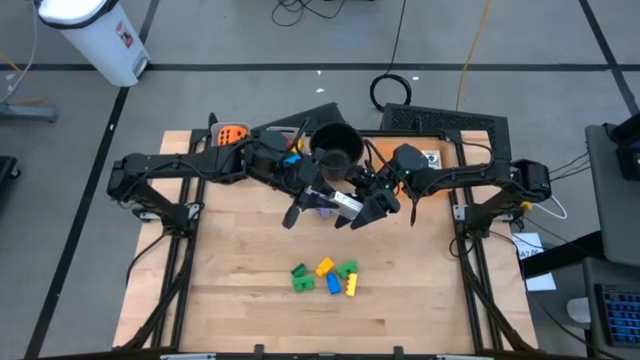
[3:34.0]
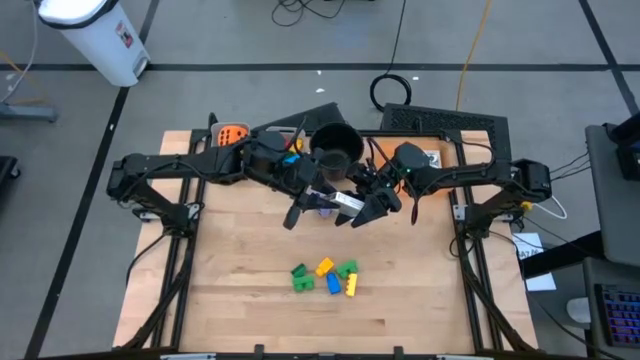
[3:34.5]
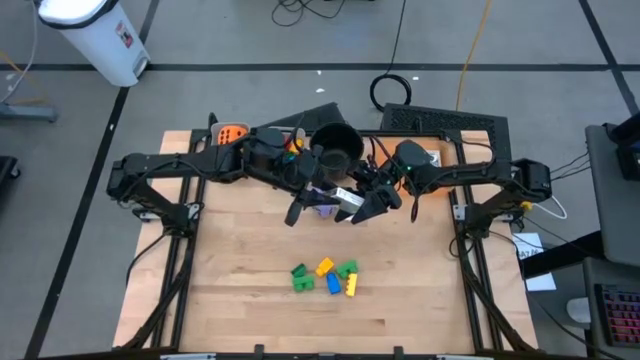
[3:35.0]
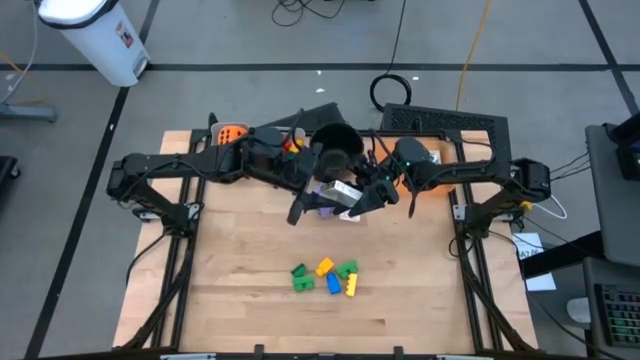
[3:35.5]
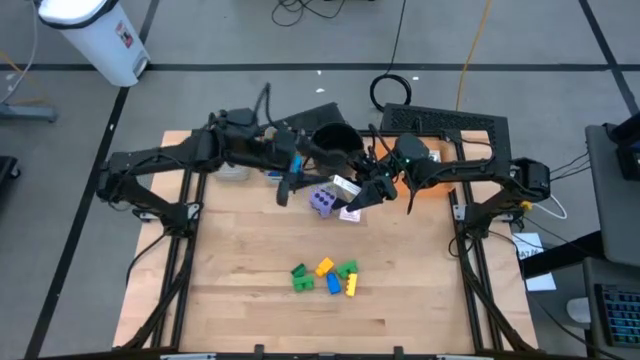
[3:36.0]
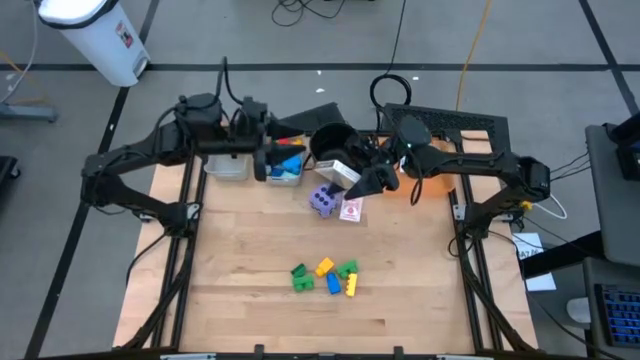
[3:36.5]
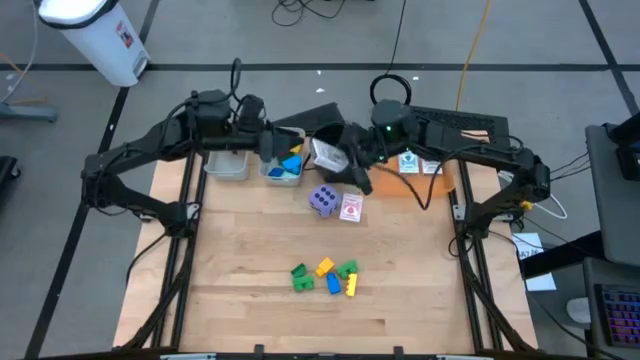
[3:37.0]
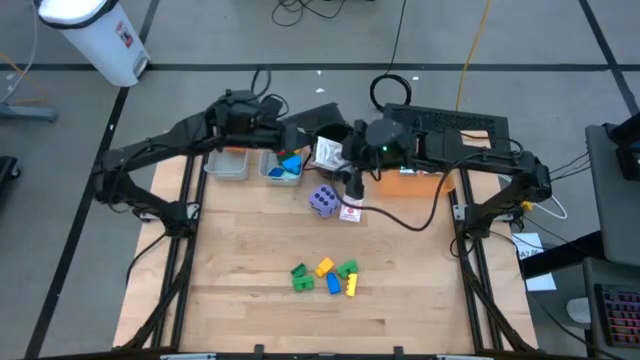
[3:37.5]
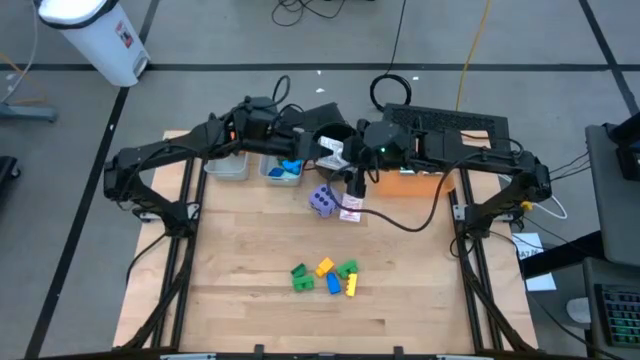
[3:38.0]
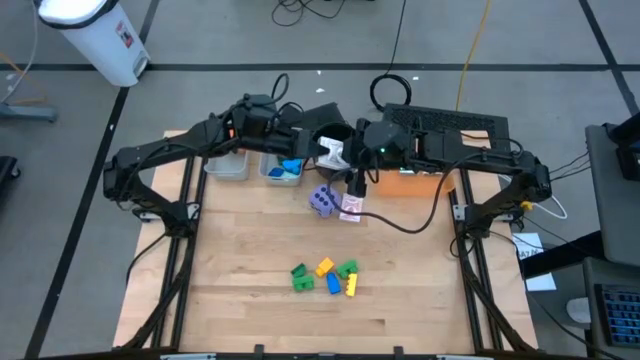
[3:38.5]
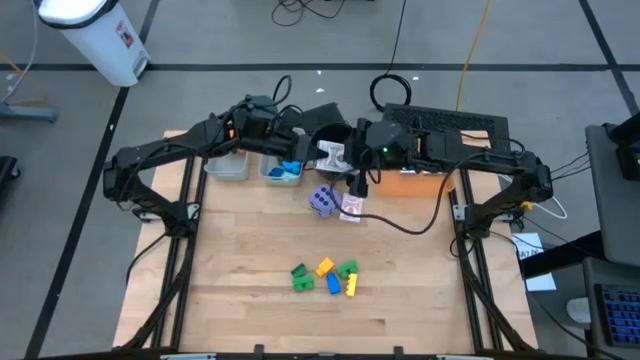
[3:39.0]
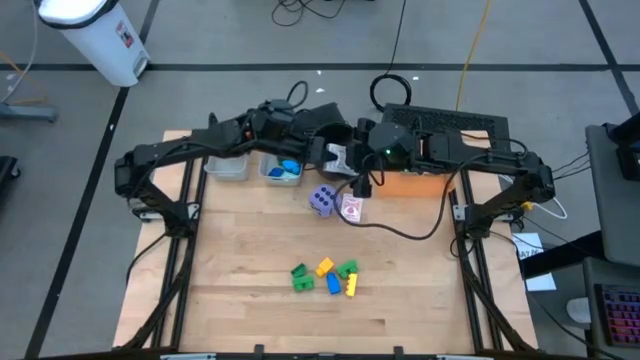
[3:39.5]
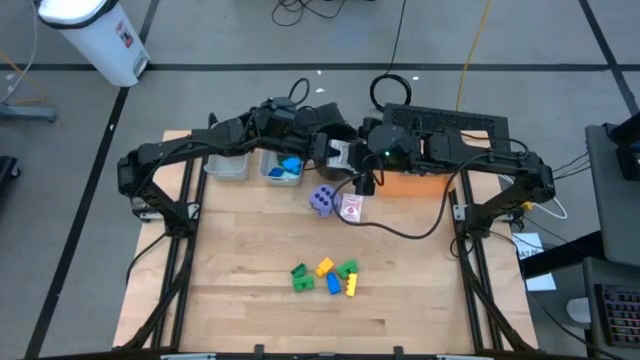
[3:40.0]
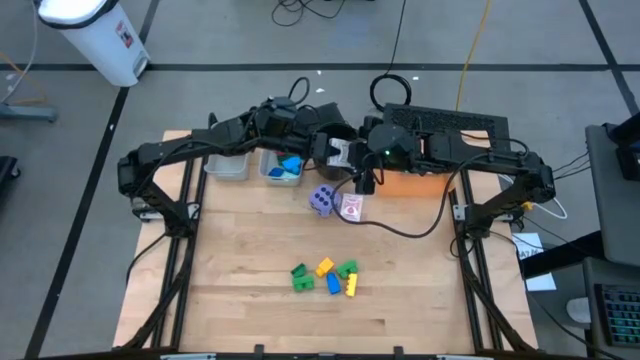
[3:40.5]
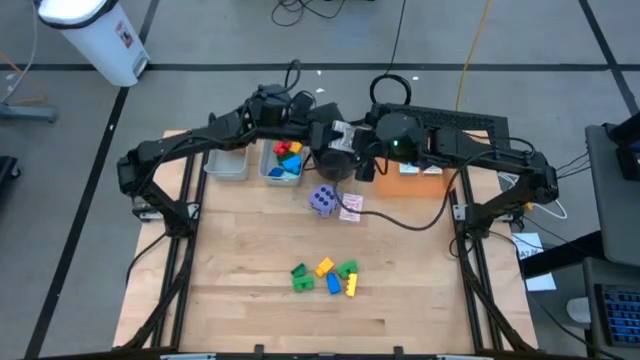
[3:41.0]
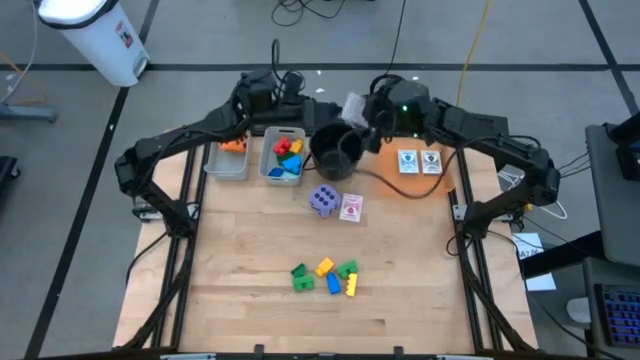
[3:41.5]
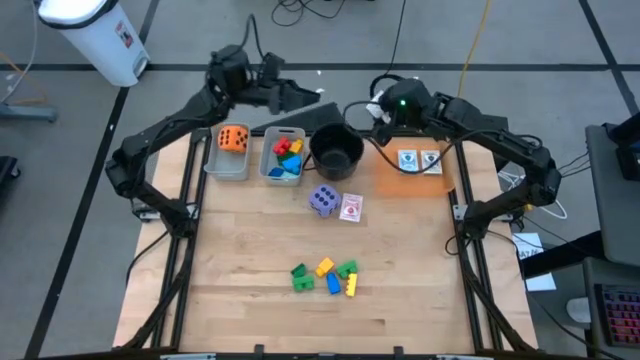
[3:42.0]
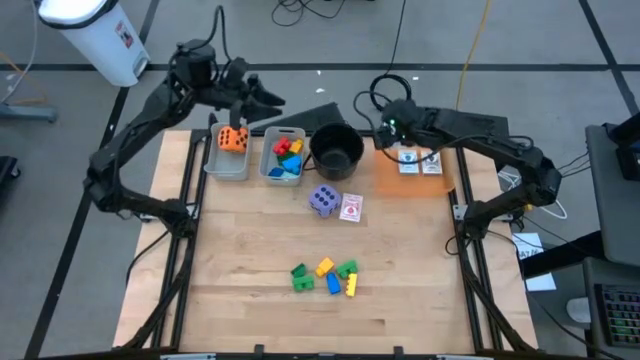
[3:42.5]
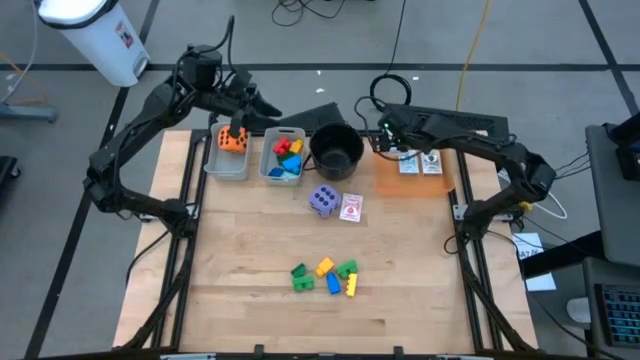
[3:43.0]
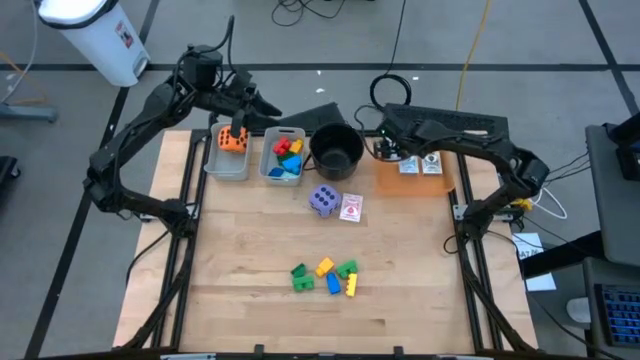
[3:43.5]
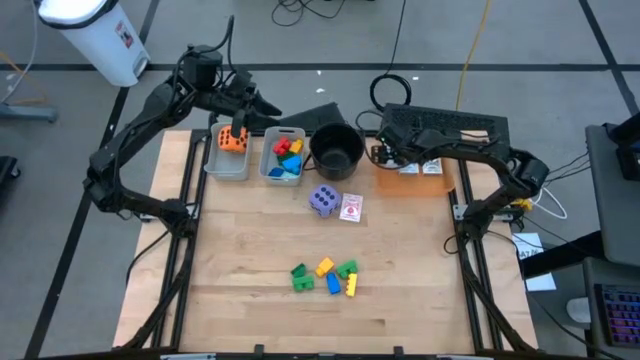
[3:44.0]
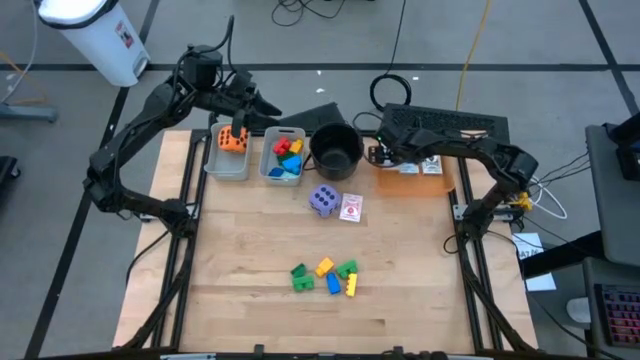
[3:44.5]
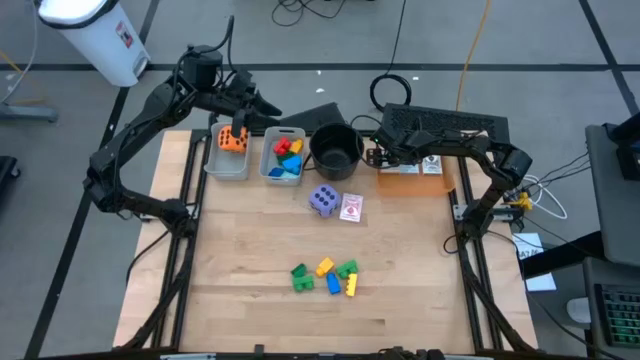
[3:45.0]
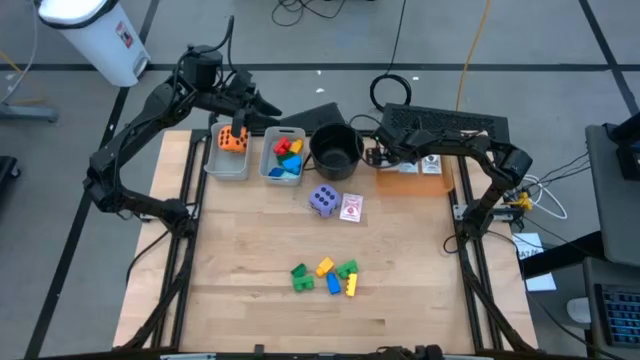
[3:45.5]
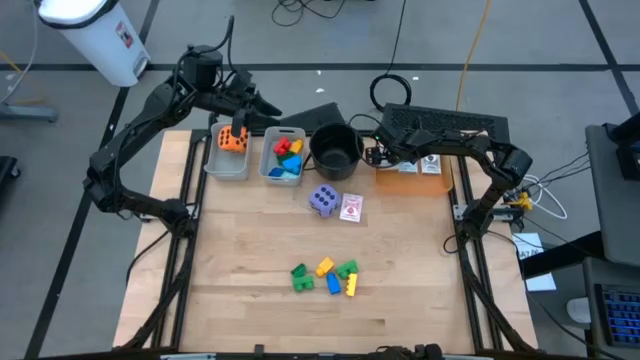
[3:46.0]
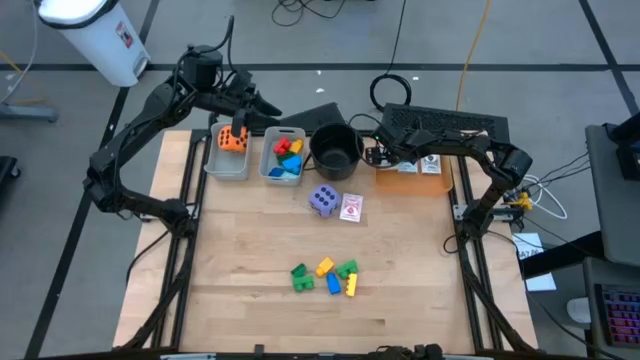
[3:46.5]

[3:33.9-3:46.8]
Task: Pick & Place Toys
Put the brown deck of cards into the orange bin

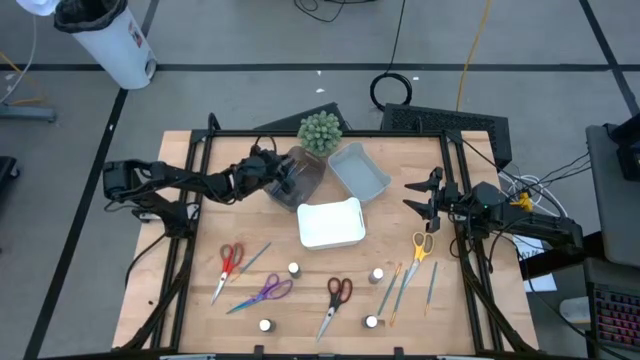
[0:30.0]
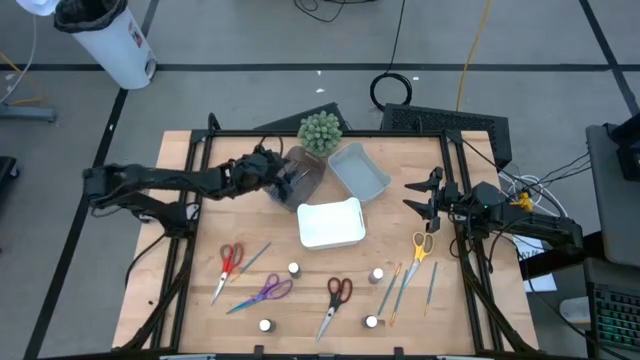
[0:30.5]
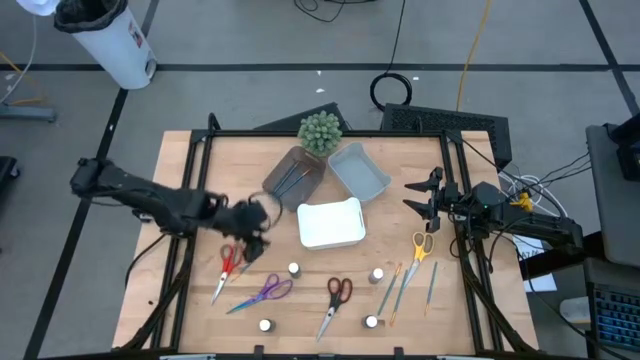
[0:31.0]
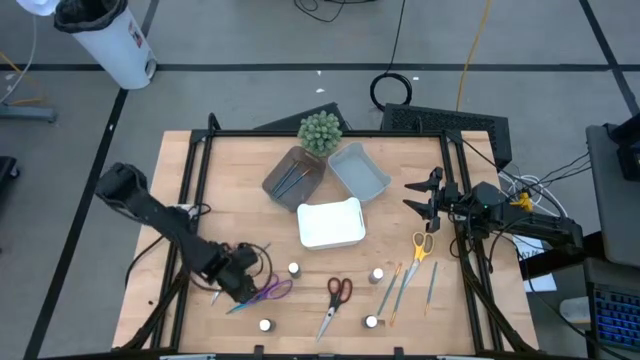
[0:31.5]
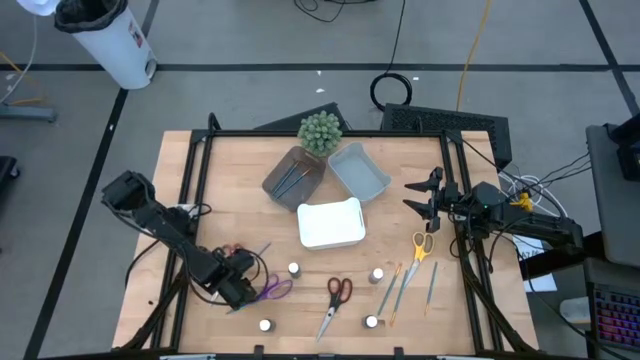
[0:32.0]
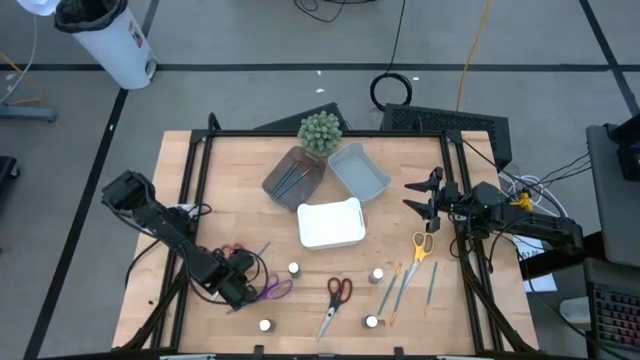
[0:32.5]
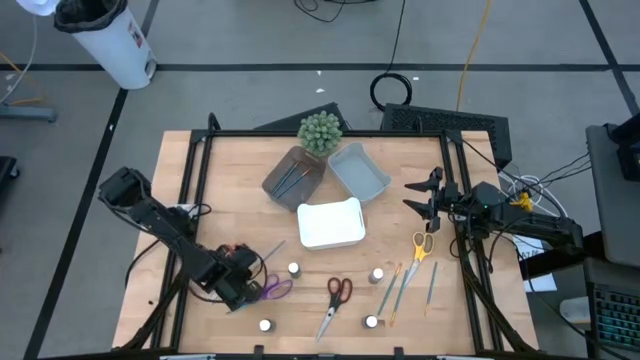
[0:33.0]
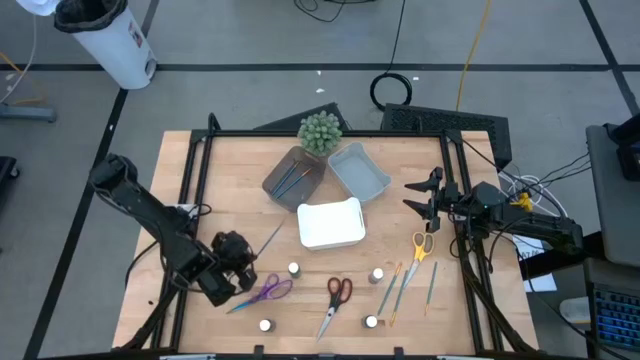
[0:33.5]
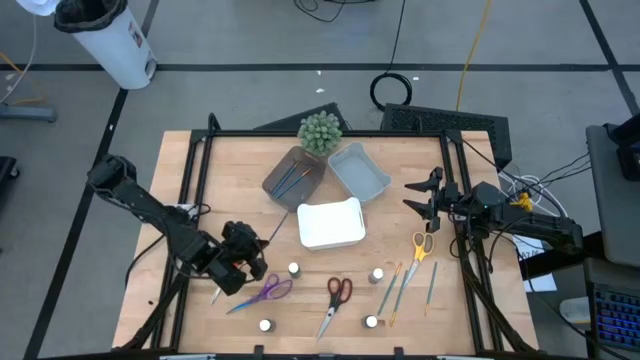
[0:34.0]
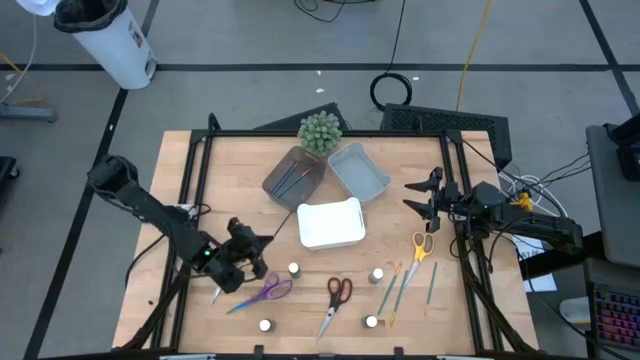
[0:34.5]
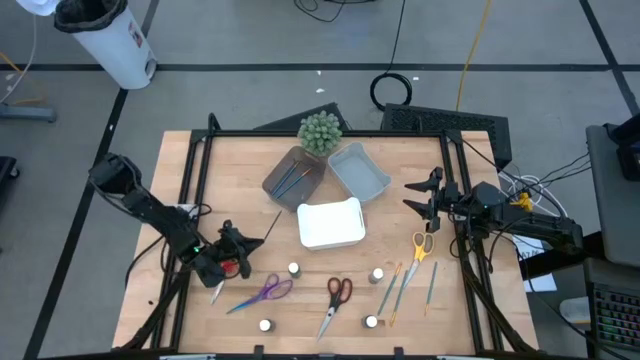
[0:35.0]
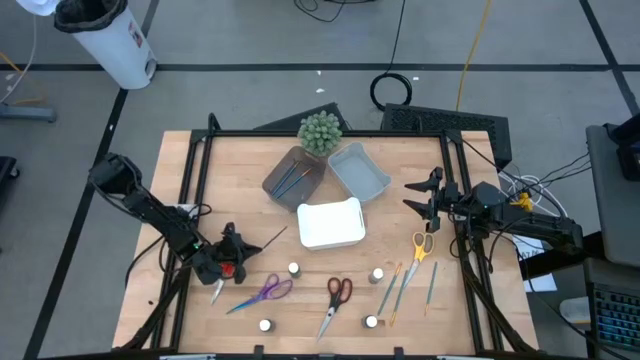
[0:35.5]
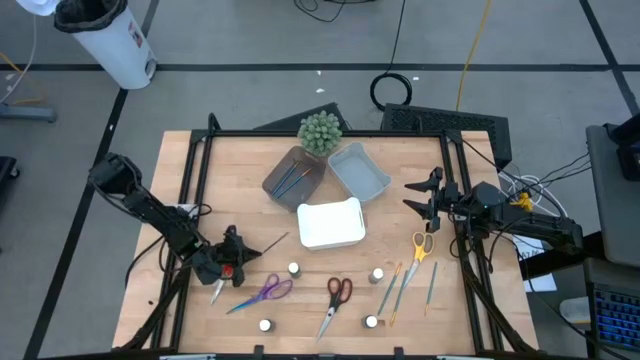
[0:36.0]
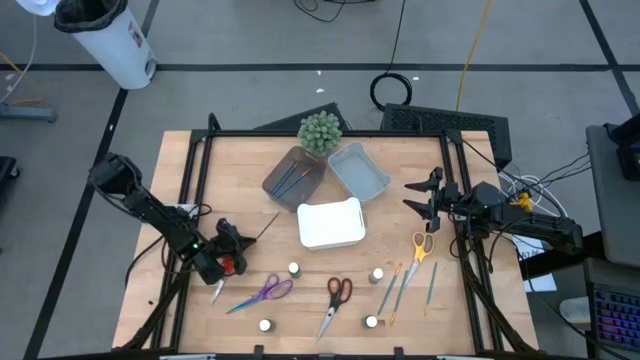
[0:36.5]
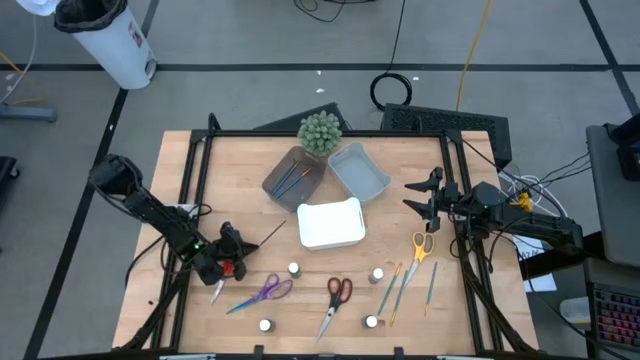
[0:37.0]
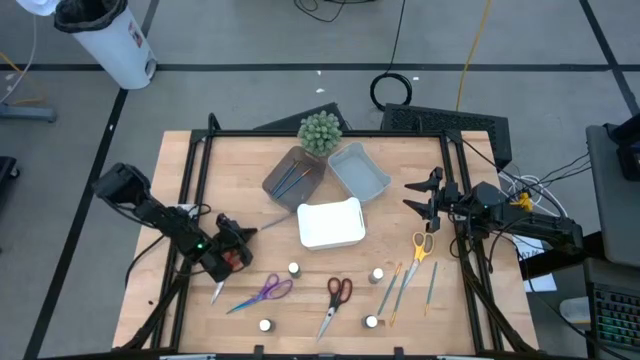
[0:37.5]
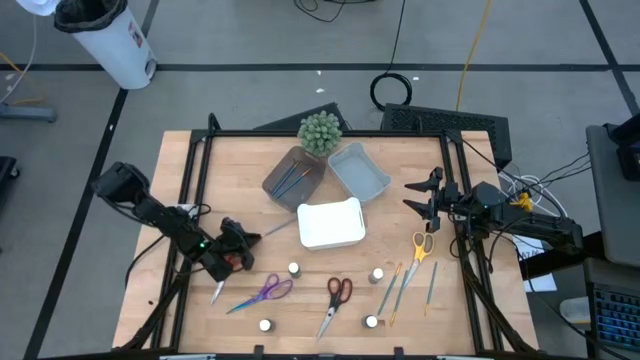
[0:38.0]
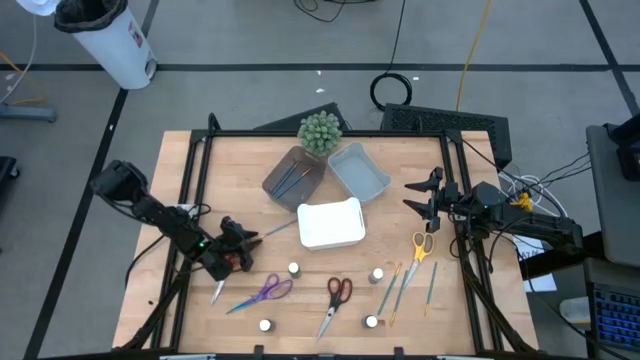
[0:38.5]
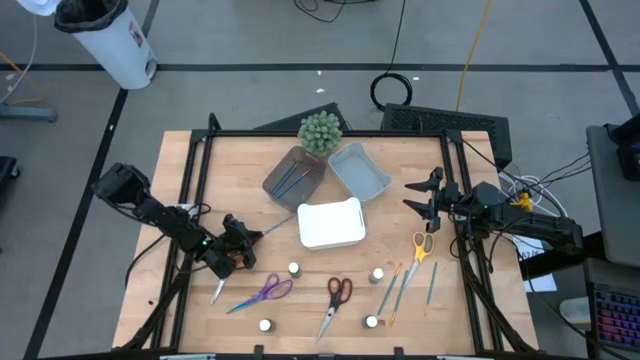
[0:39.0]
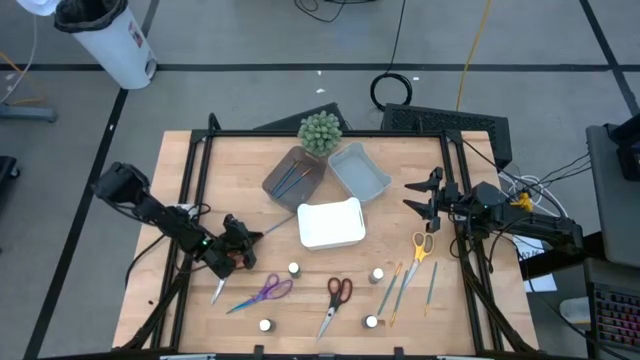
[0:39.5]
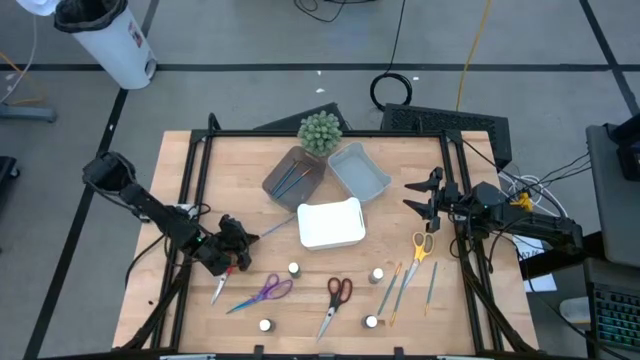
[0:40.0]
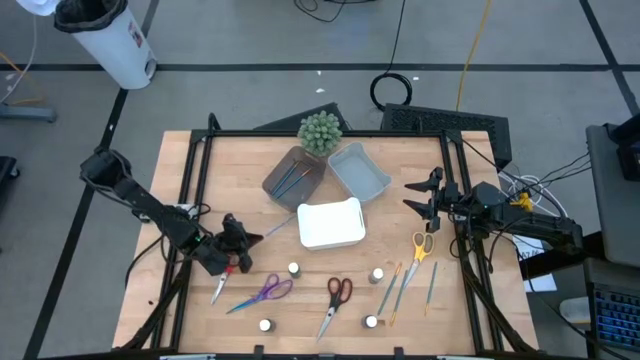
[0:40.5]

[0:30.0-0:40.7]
Task: Pick & Place Paint Supplies
Put the blue paint brush into the black bin
